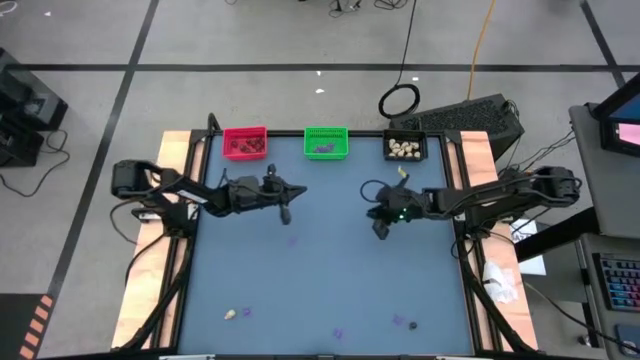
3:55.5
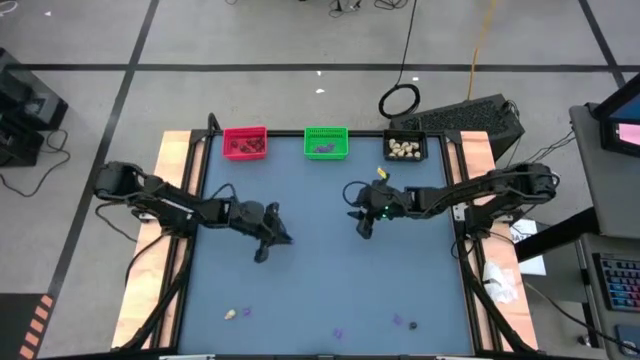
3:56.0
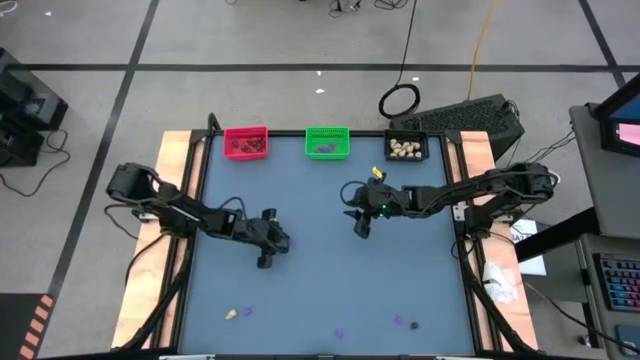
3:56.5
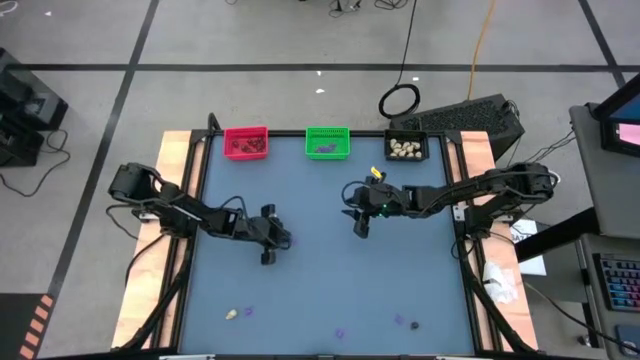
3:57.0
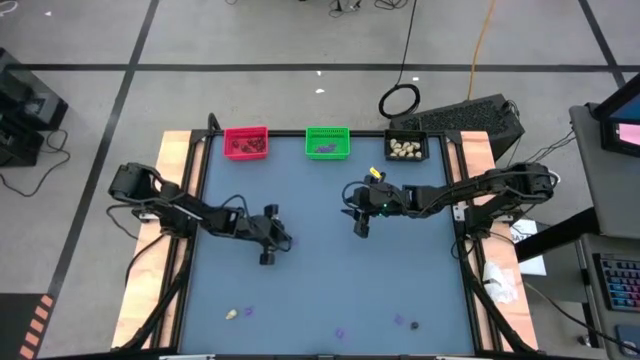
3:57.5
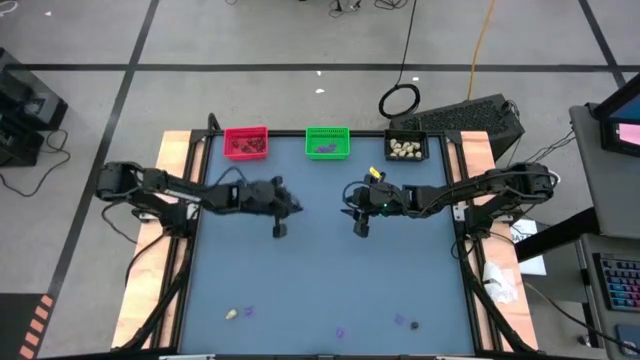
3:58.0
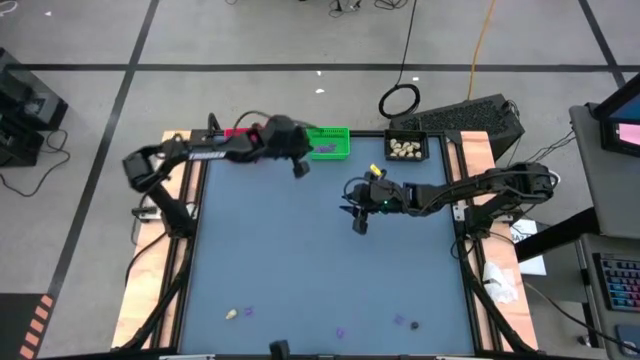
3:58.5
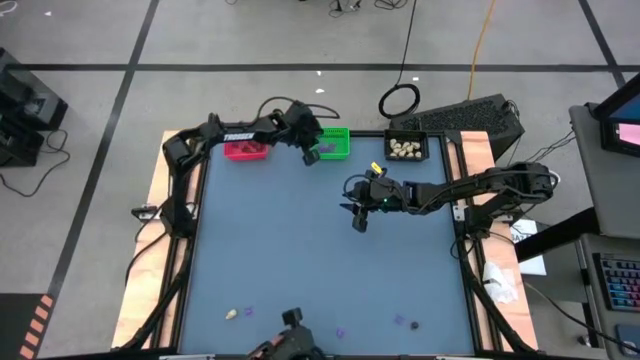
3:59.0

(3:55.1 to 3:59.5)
Task: Sort Halloween decoration
Put the purple spider toy into the green bin

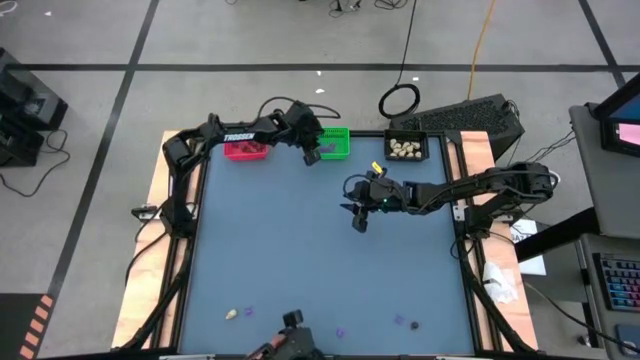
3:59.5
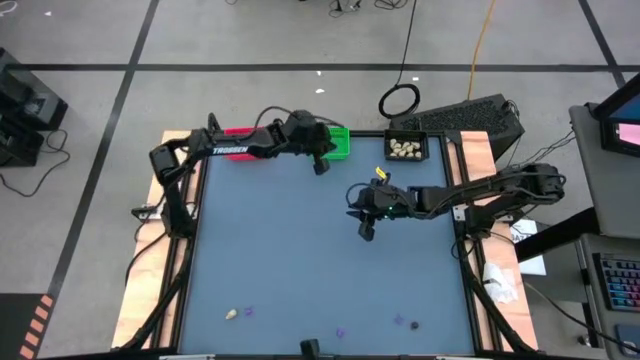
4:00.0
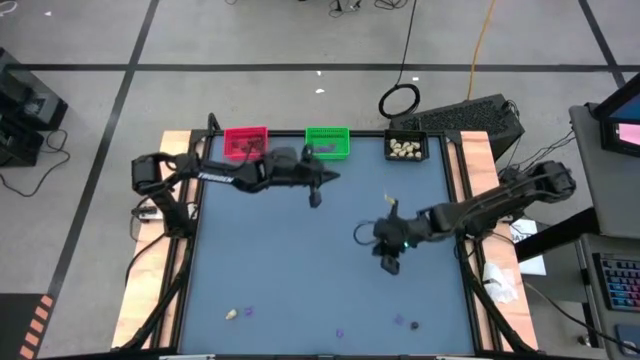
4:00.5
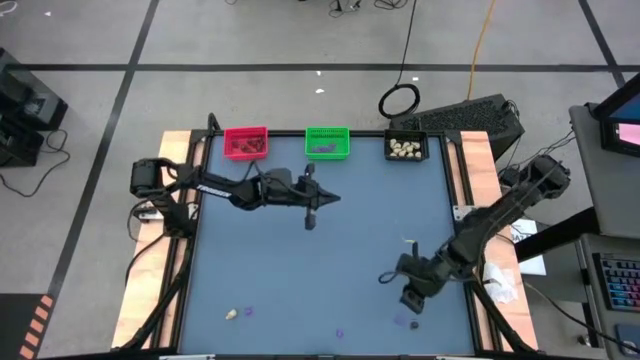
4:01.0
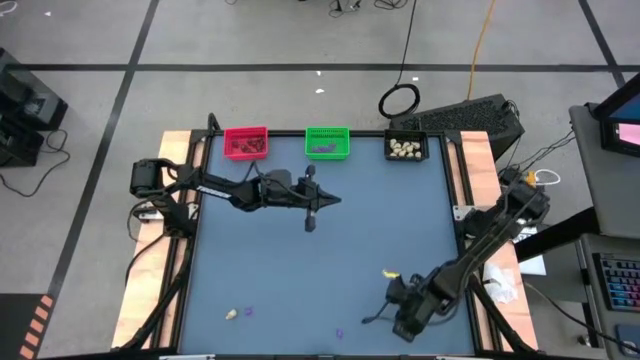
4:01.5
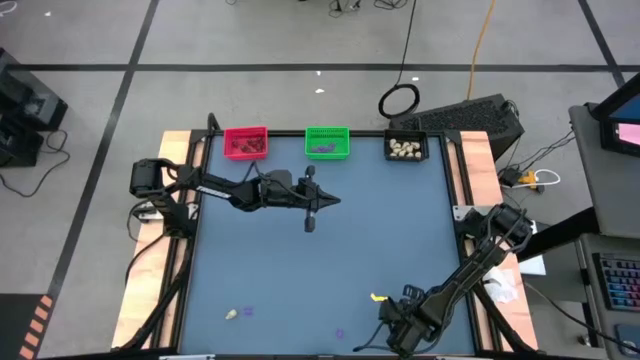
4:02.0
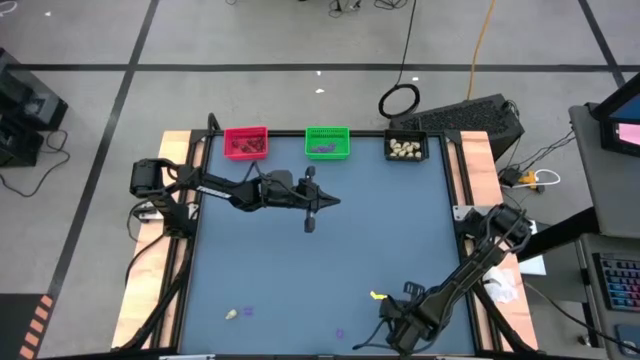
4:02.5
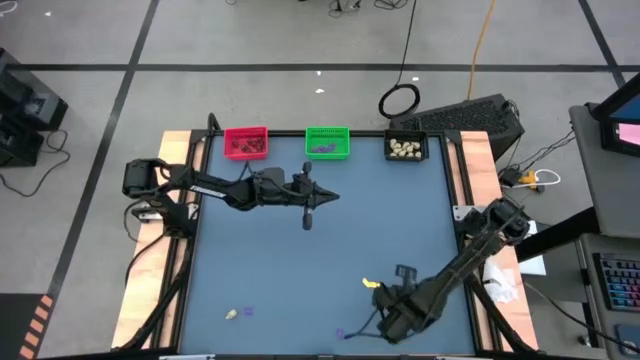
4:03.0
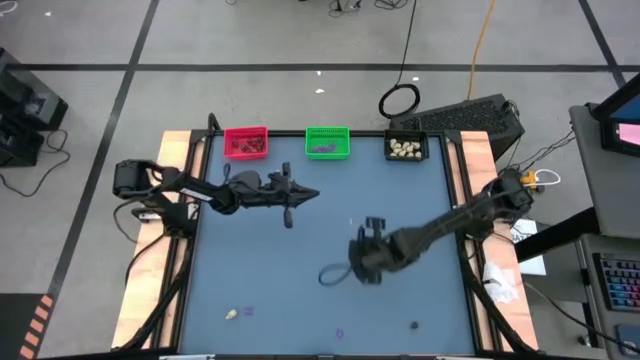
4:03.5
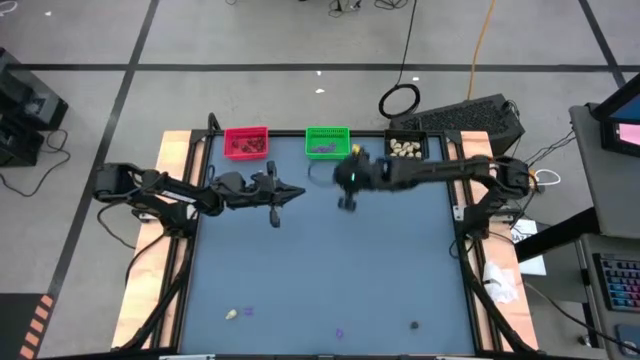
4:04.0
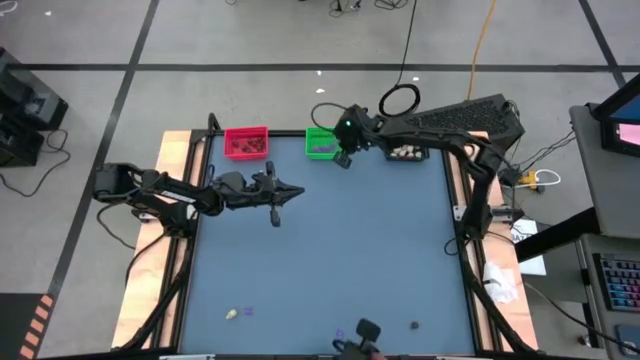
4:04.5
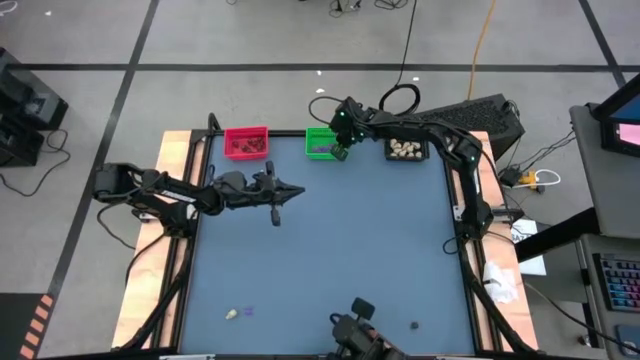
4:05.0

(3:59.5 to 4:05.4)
Put the purple spider toy into the green bin

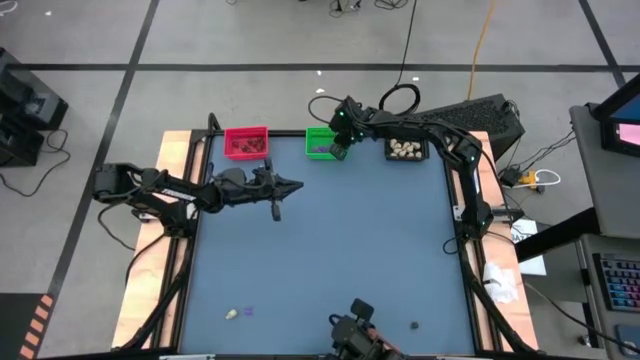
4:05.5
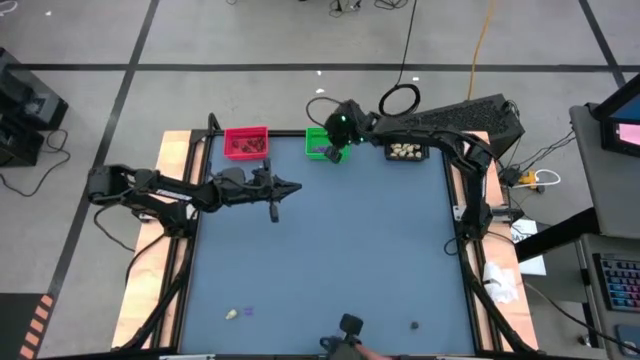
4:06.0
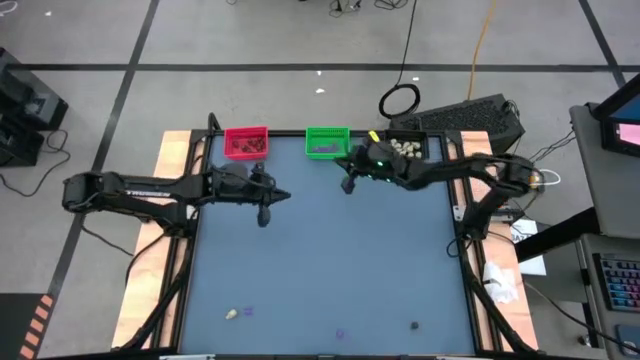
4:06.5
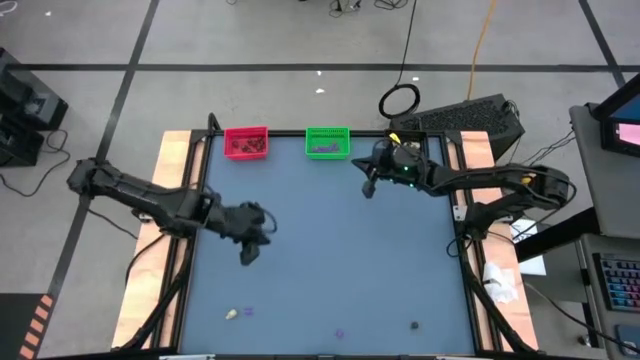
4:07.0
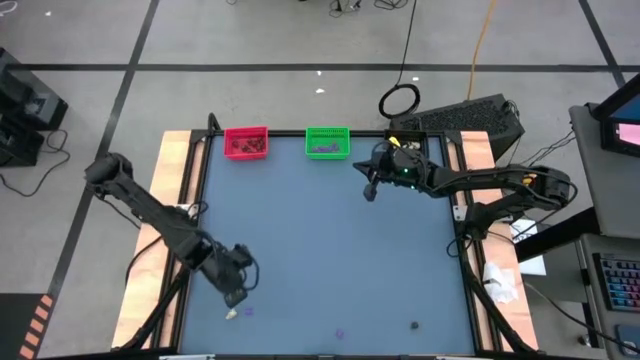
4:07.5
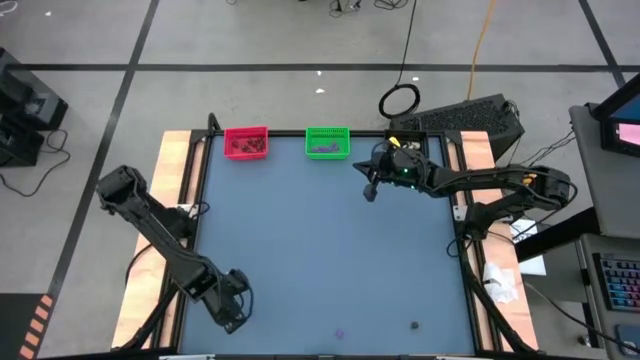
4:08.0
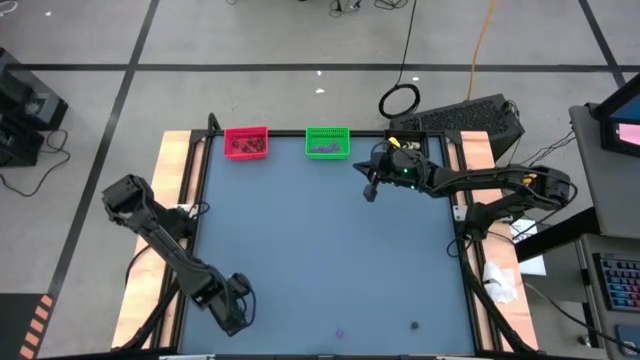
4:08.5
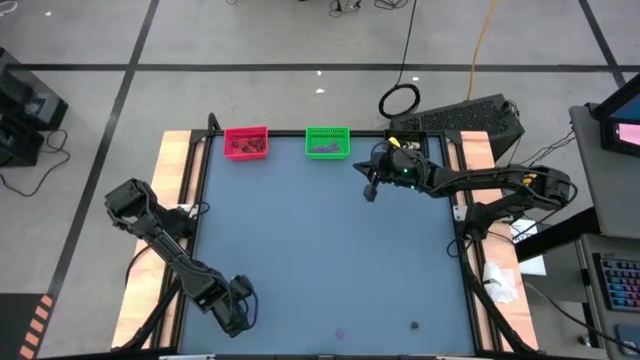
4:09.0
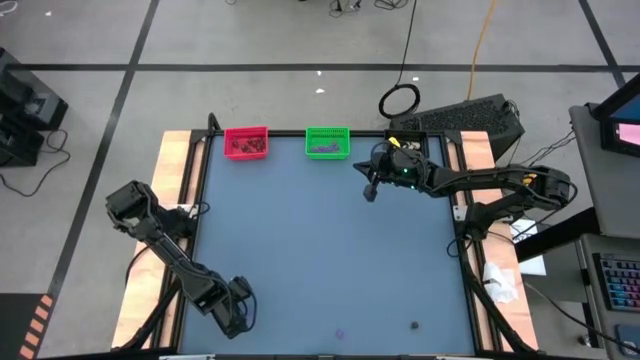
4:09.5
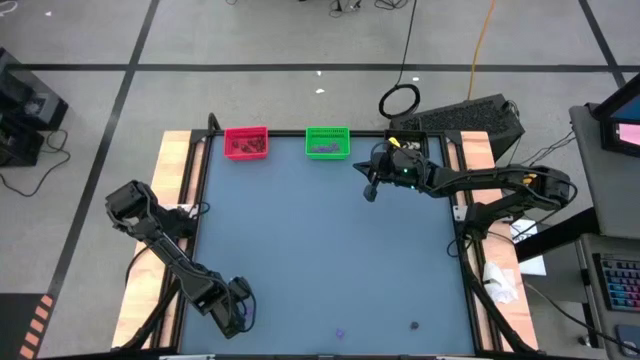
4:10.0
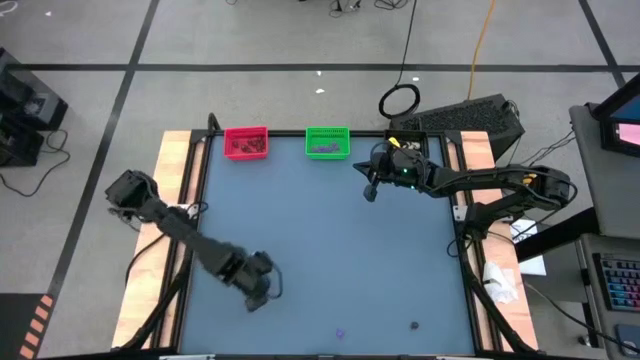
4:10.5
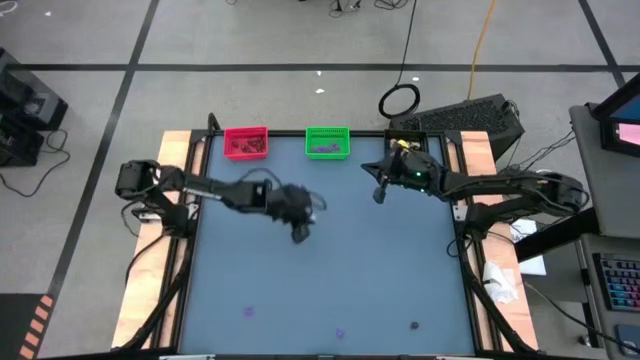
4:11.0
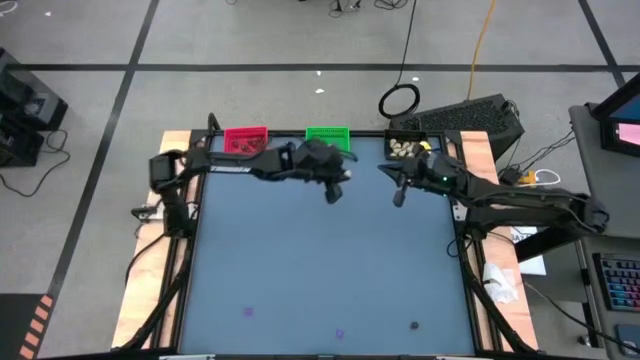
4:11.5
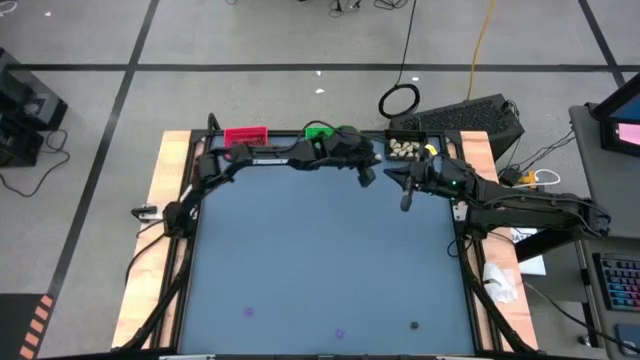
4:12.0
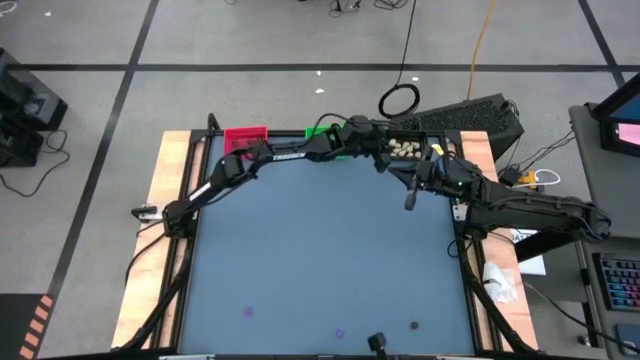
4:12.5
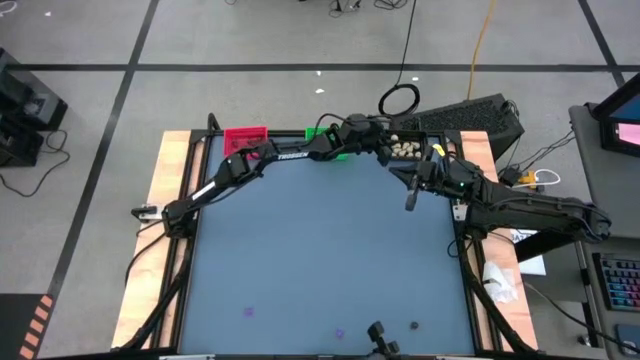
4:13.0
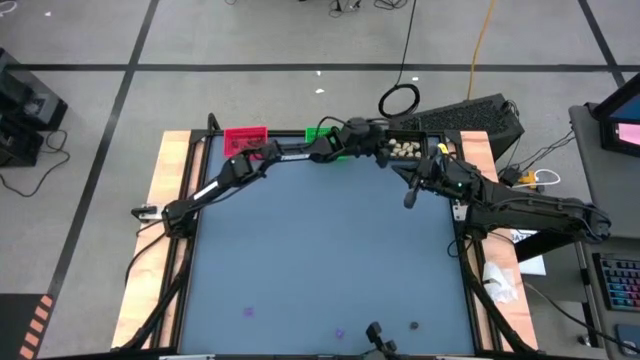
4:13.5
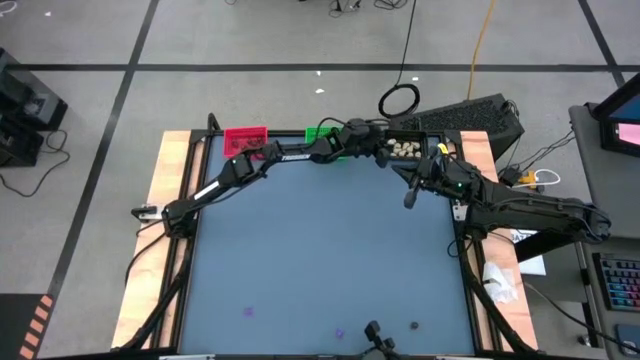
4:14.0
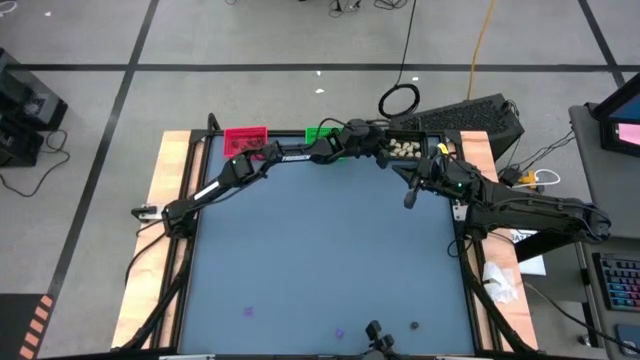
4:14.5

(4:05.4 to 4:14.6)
Put the white skull toy into the black bin

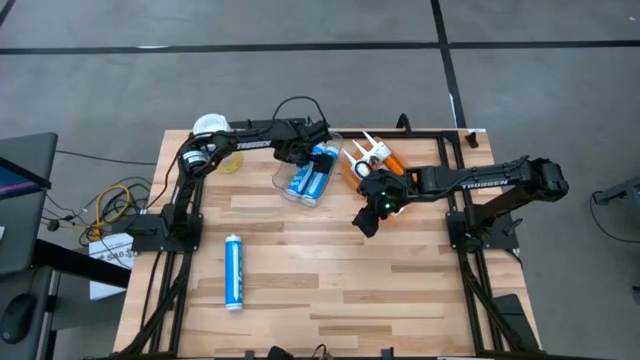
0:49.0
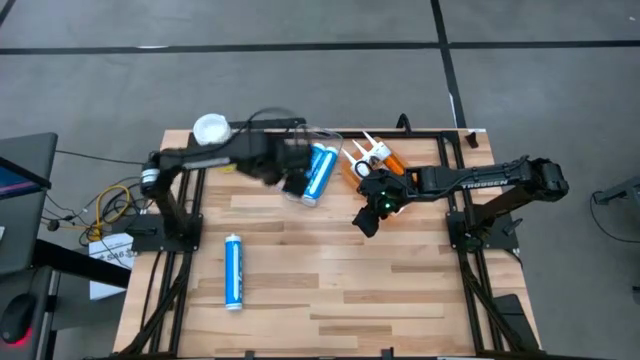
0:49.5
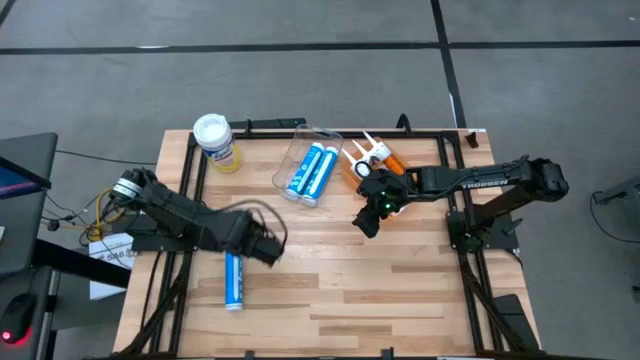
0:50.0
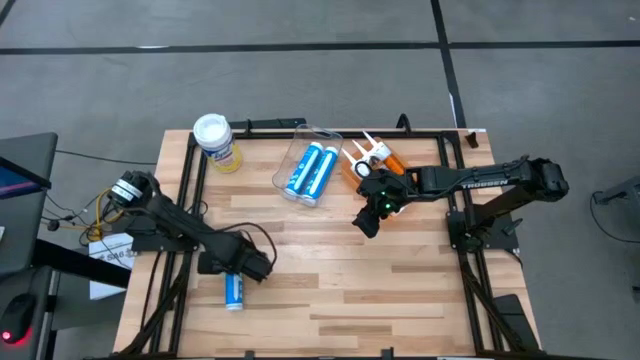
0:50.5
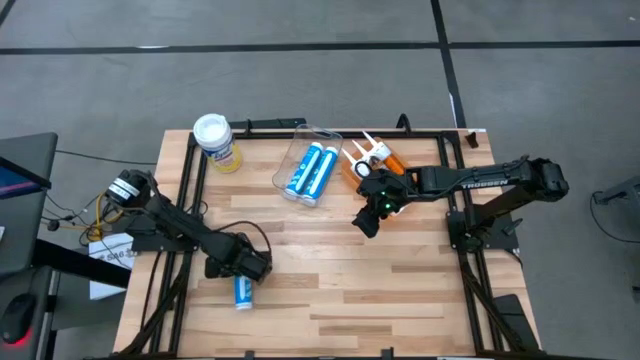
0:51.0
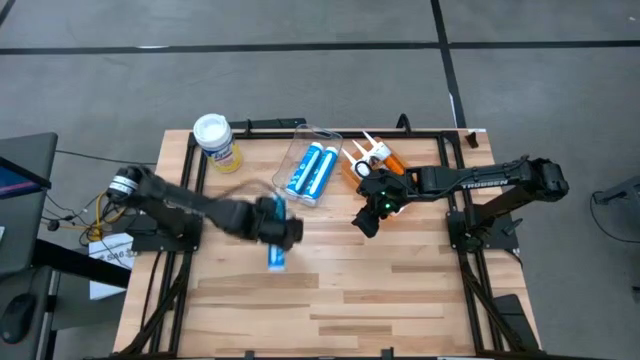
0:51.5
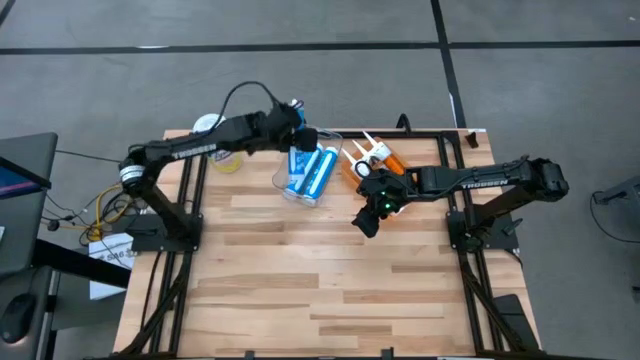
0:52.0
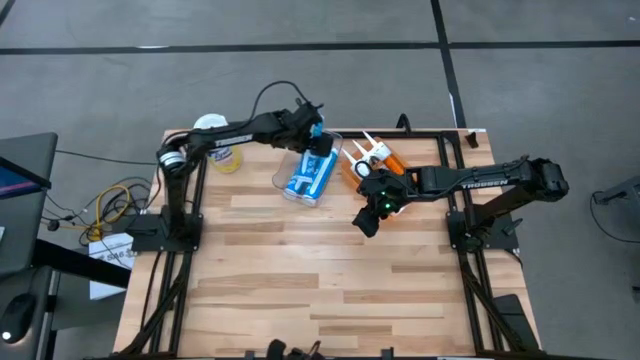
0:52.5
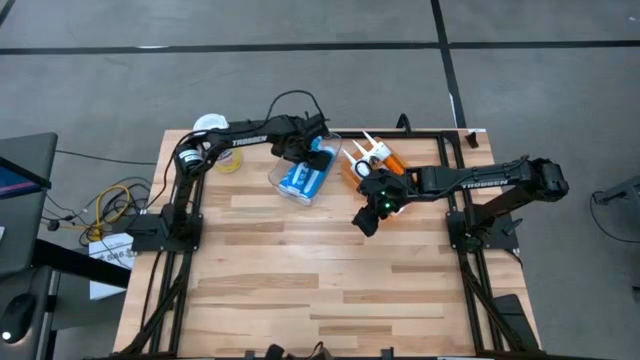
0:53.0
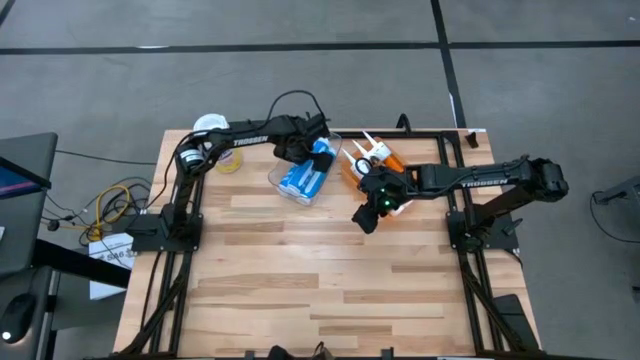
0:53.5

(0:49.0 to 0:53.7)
Task: Pick & place silicon tubes, Sealant and Lysol wipes
Put the blue sealant into the left transparent bin
